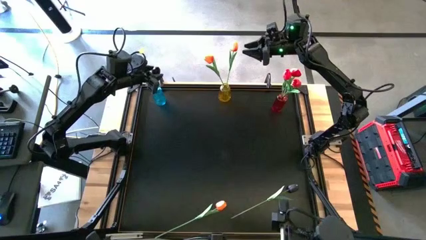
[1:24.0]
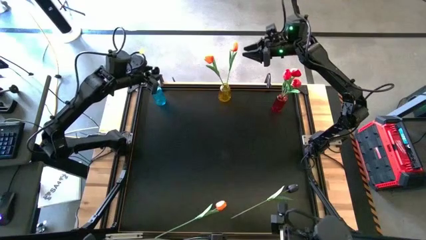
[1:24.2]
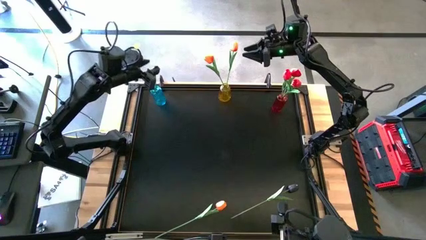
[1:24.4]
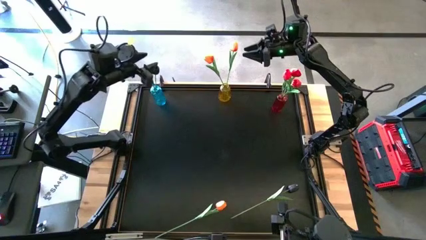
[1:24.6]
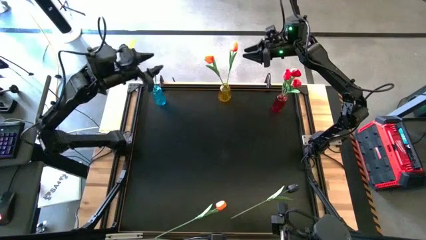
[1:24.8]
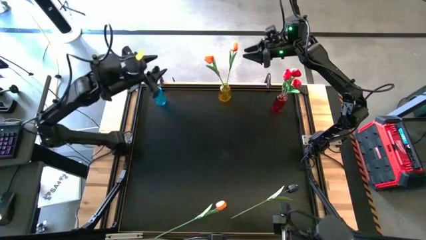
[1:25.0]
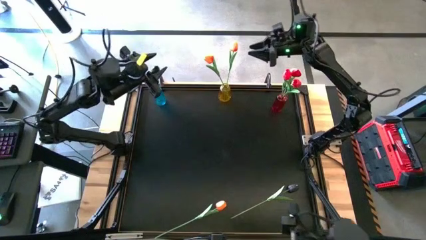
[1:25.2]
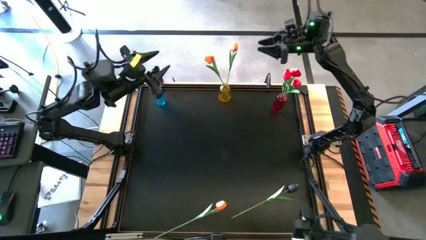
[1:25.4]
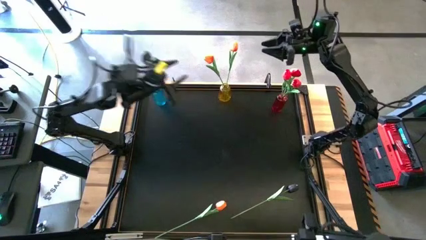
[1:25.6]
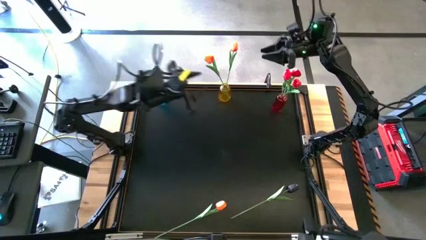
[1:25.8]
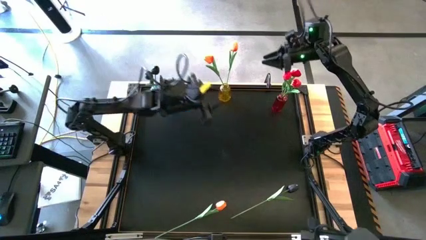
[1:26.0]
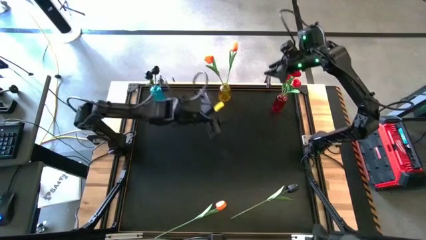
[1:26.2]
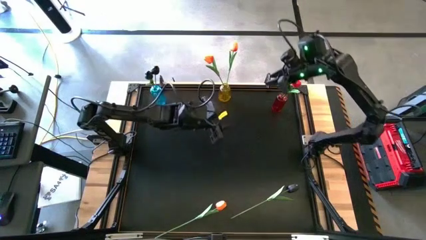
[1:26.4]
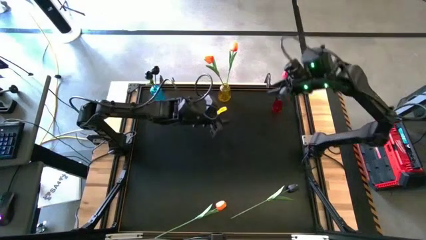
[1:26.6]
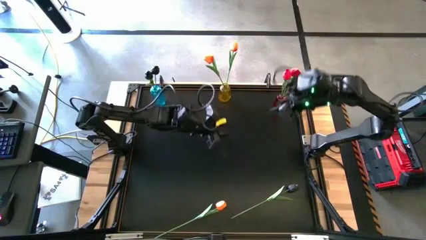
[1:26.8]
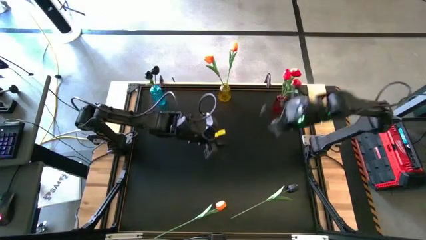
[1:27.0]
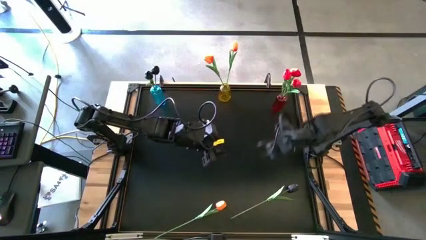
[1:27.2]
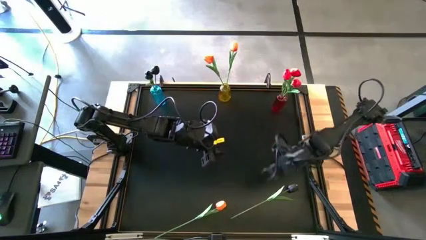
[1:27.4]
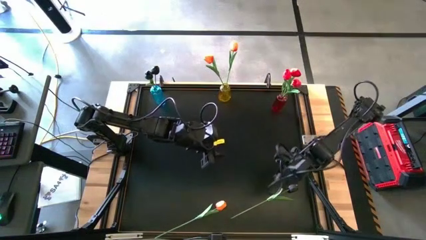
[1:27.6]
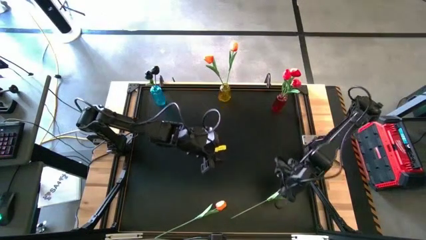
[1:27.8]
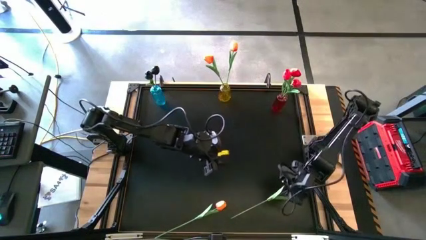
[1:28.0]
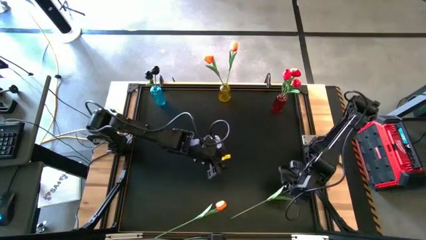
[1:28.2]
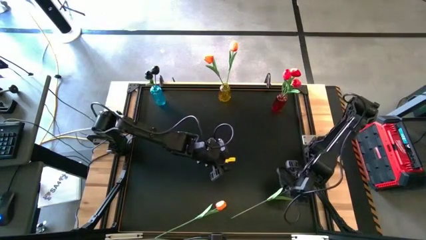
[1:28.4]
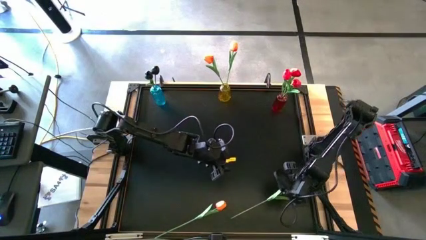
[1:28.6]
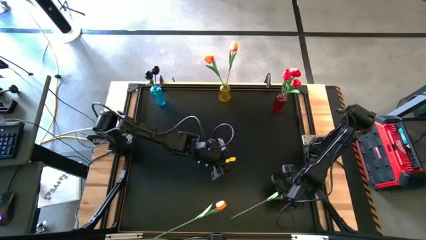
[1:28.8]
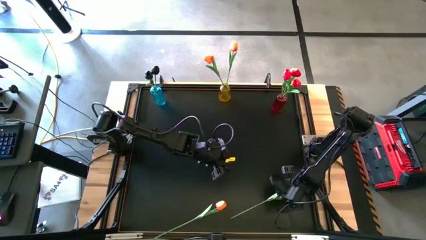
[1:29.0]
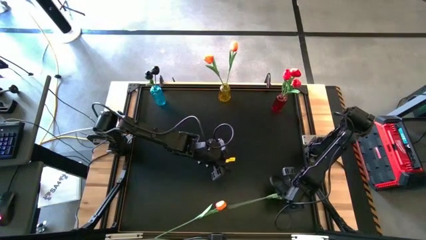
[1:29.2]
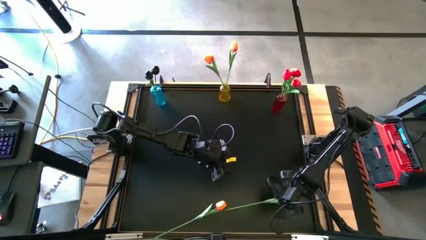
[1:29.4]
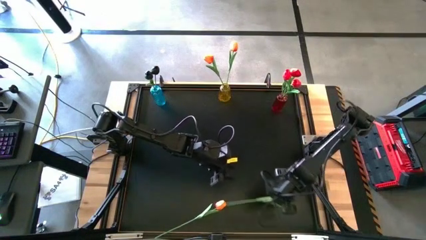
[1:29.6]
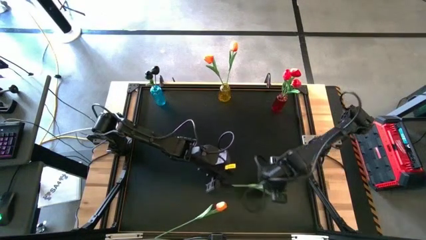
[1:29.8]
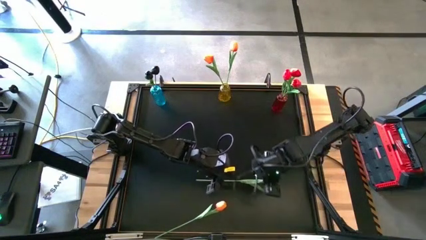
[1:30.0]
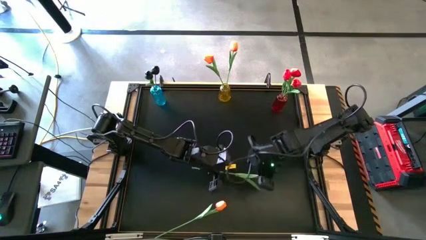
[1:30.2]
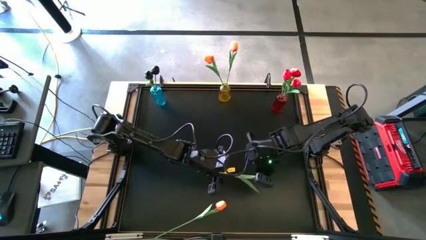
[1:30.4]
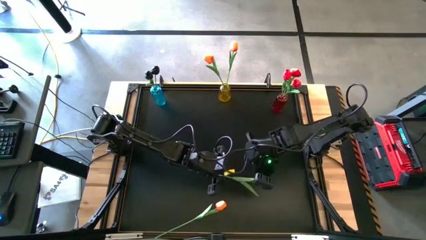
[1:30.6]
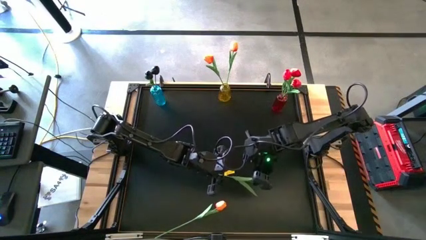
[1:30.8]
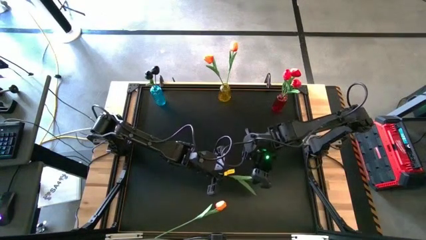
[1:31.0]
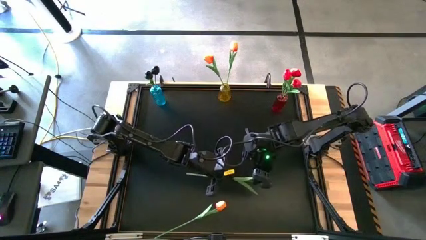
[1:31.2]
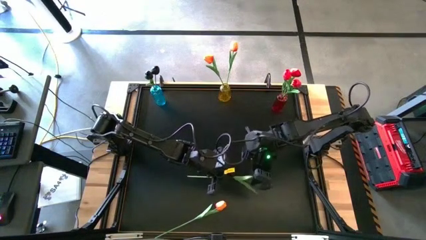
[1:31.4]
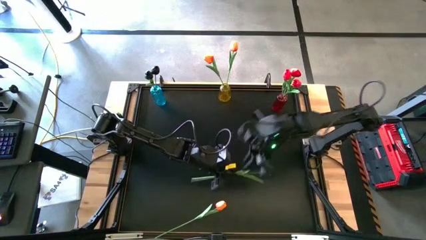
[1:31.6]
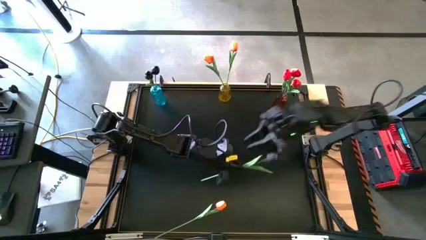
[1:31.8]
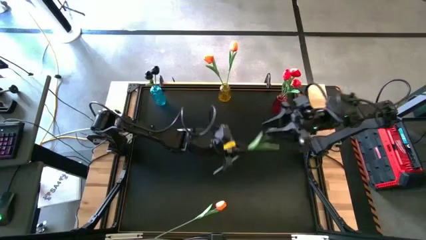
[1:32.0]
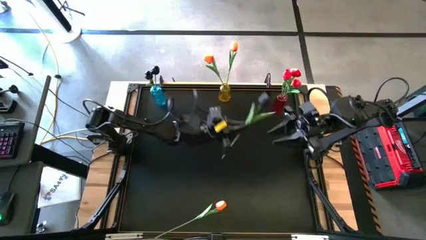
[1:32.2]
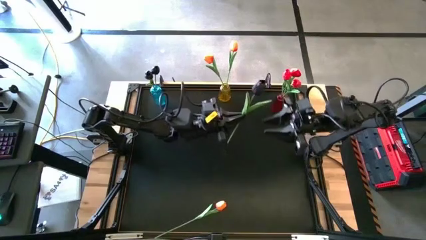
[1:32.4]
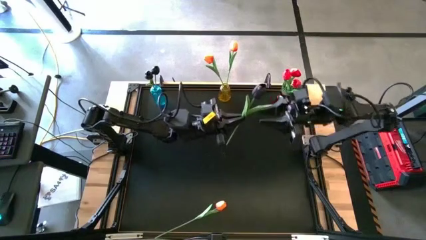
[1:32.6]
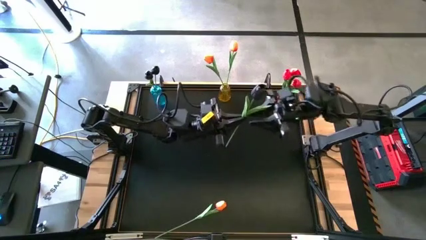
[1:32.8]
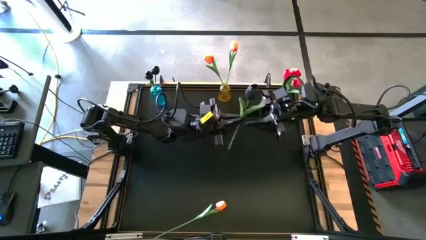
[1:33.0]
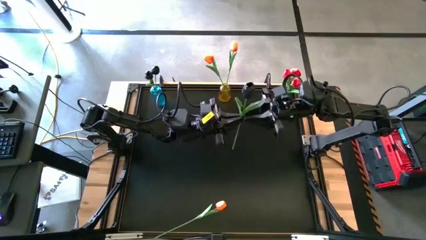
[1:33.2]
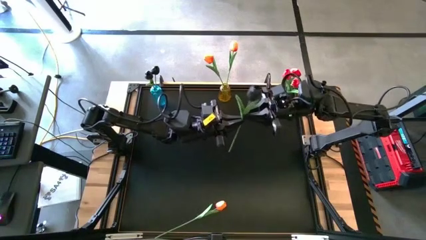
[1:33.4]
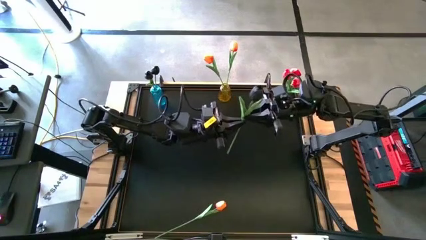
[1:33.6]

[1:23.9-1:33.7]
Task: Sort flowers into vase by color
Put the black flower into the blue vase

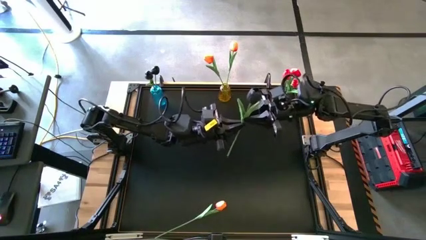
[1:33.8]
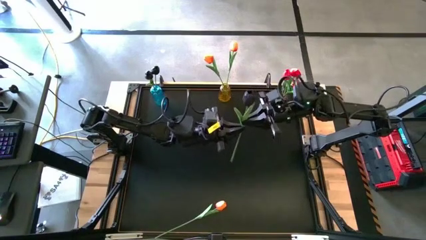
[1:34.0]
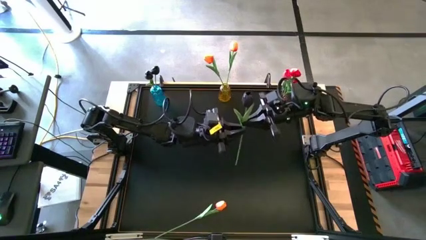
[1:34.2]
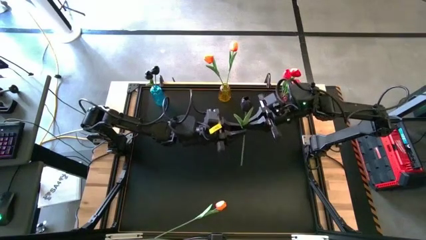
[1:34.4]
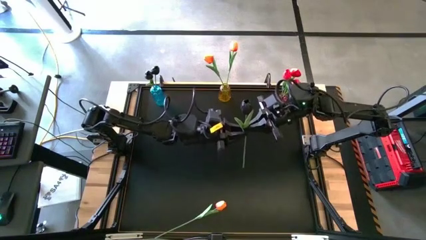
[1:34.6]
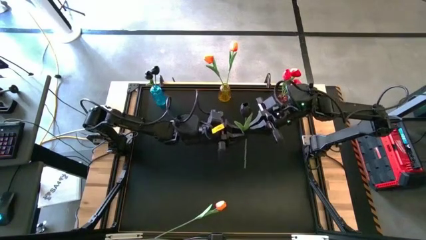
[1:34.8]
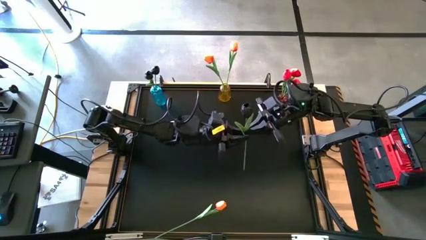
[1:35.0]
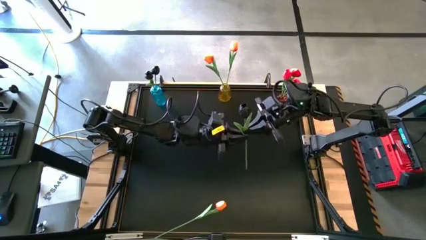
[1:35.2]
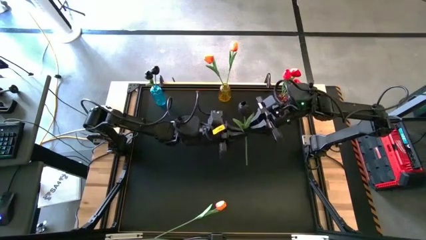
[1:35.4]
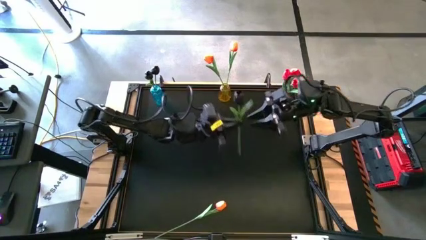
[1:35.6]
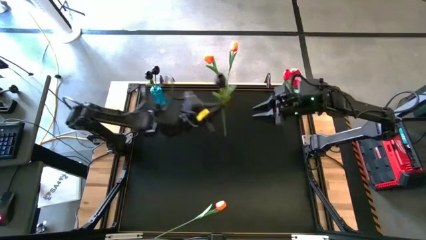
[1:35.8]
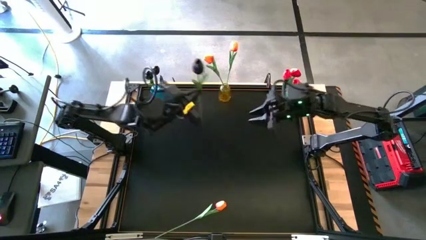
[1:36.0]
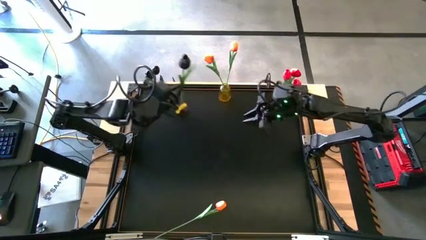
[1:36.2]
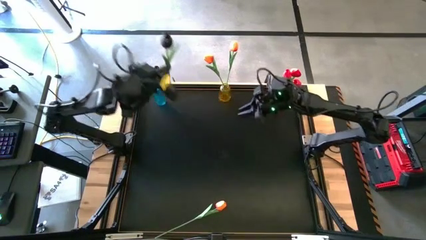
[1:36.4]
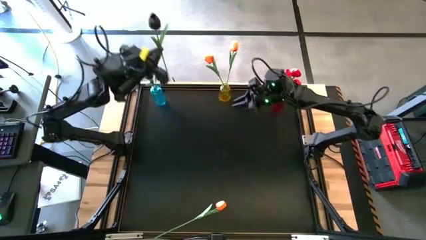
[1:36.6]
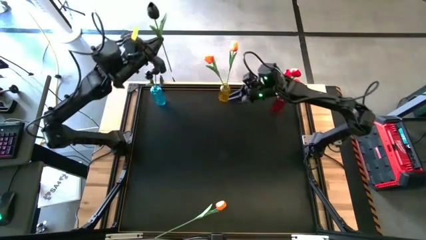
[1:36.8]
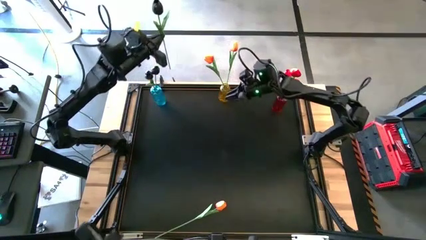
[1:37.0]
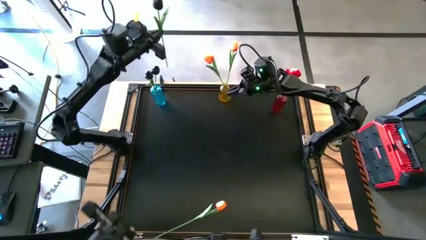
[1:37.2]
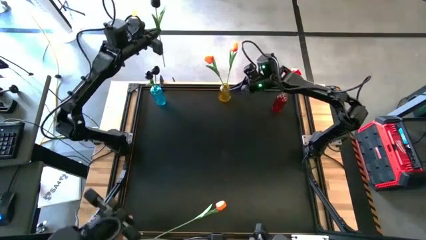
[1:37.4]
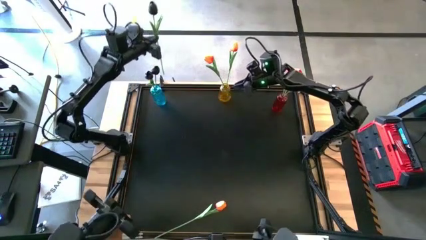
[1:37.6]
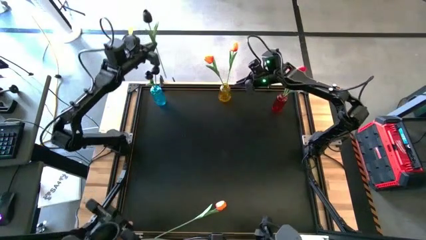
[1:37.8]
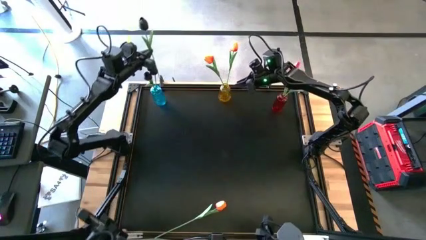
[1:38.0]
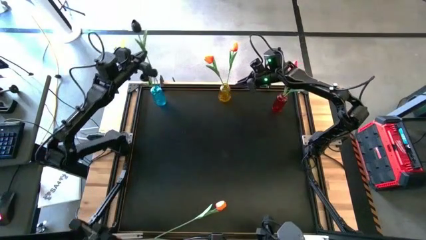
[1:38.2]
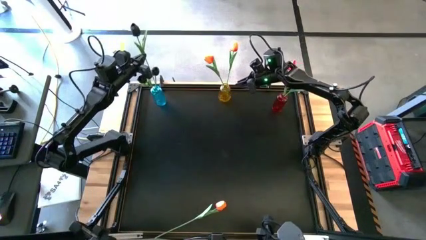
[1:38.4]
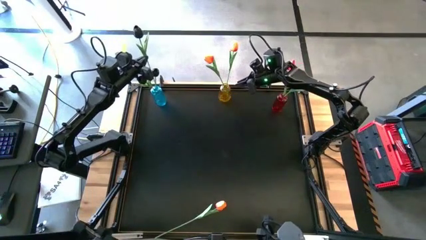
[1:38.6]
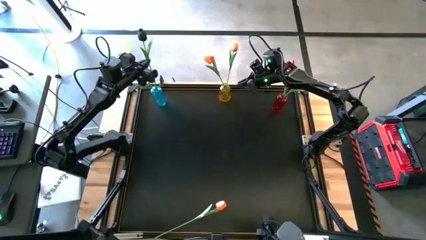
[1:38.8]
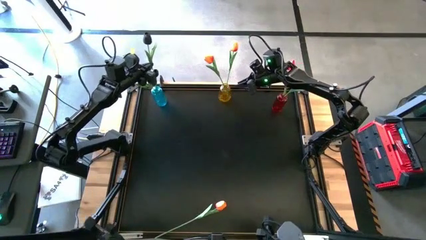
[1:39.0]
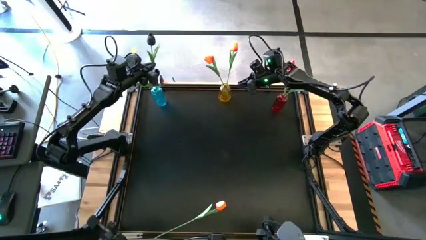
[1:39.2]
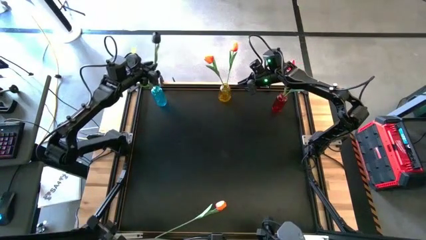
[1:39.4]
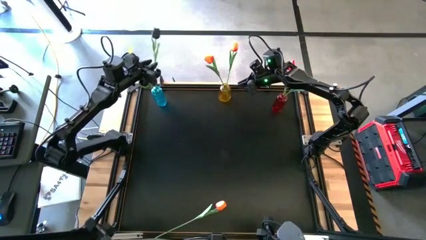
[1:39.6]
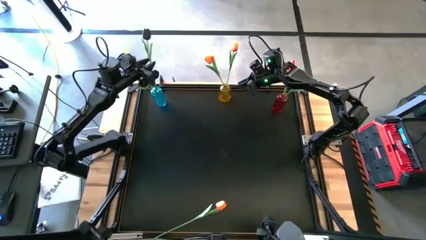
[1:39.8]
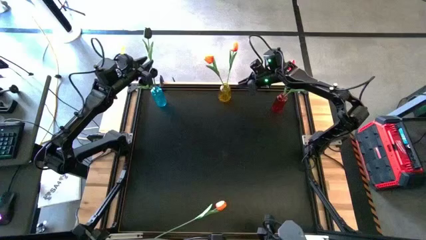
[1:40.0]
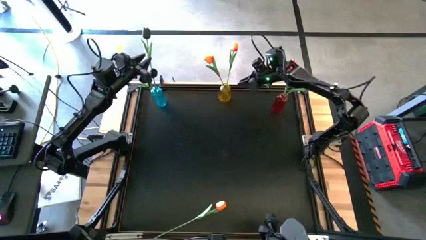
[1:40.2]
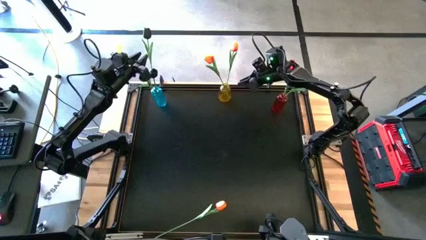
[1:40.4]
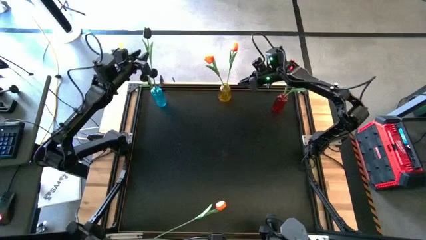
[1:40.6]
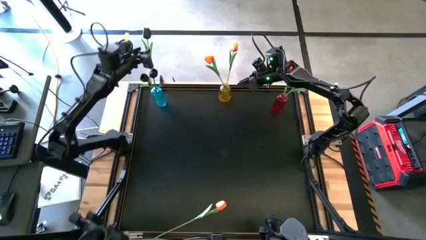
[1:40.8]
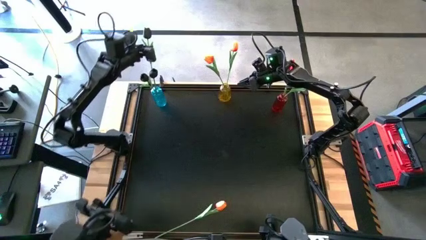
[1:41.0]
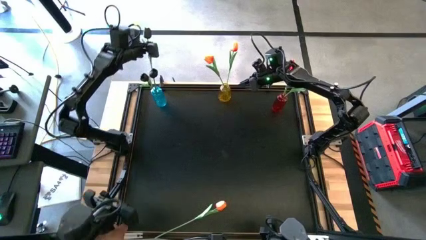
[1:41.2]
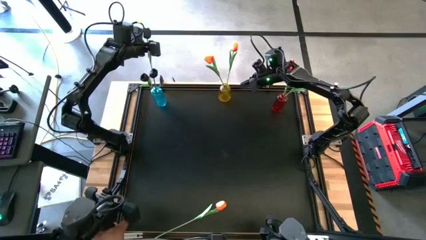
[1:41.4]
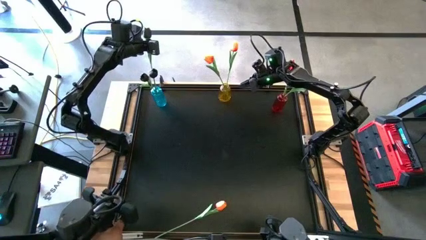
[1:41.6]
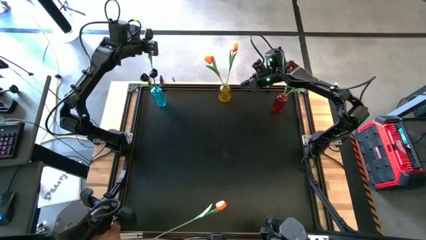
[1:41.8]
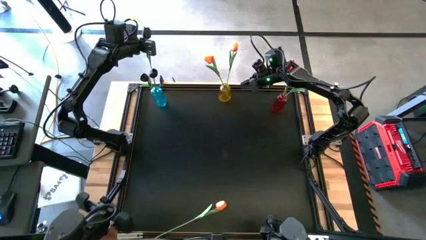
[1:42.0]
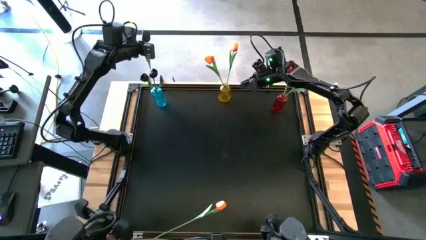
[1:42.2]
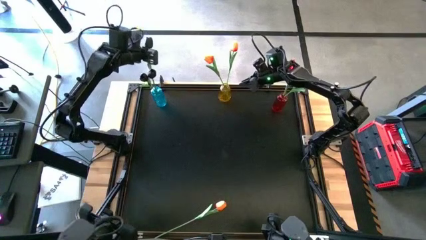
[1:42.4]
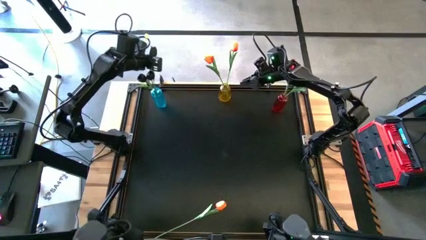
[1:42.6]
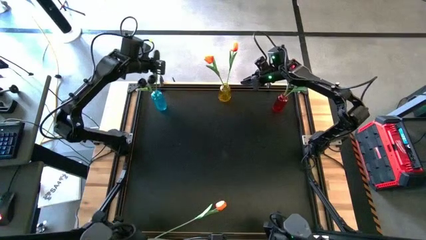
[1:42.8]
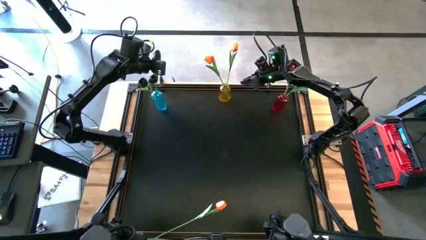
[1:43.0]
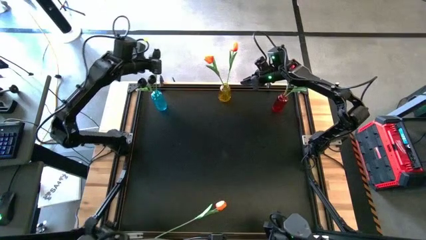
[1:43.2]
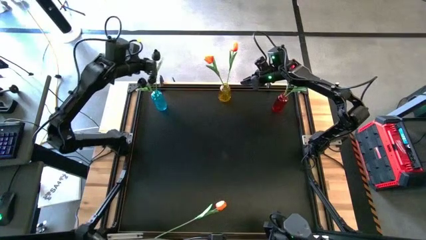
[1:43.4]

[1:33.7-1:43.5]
Put the black flower into the blue vase
